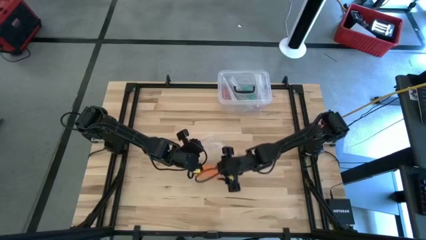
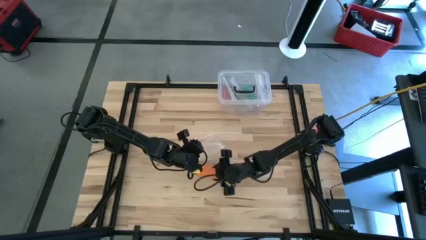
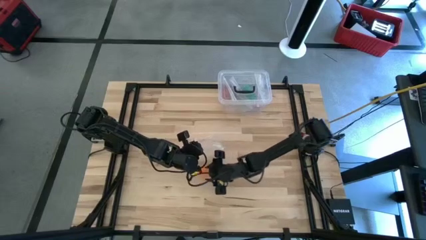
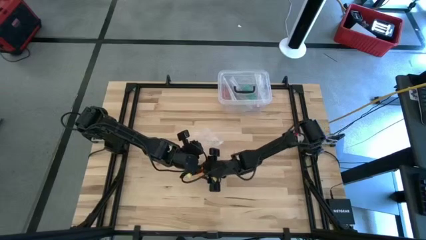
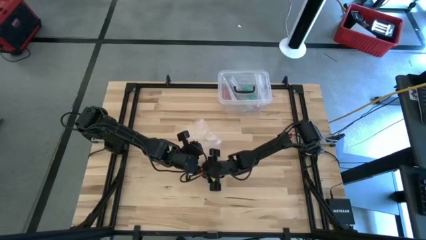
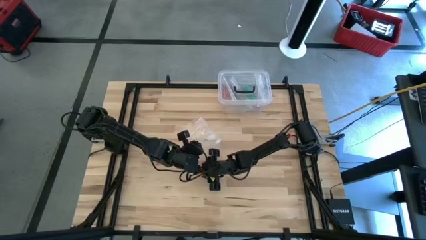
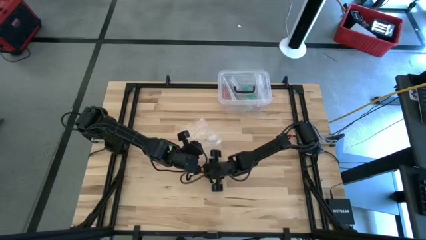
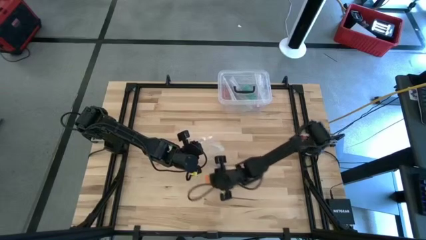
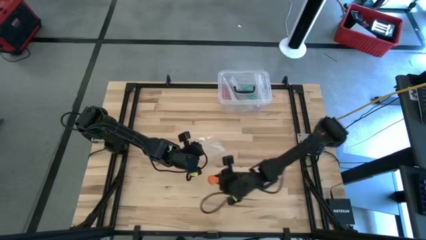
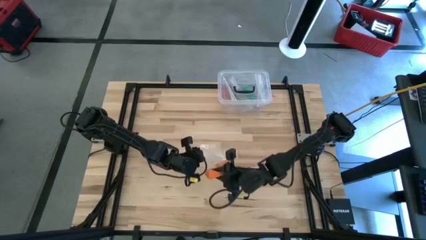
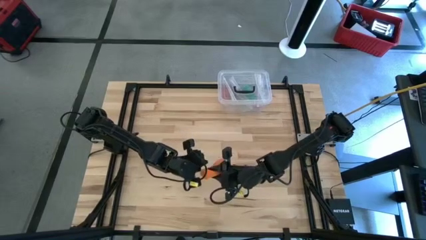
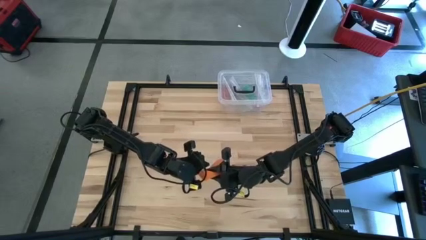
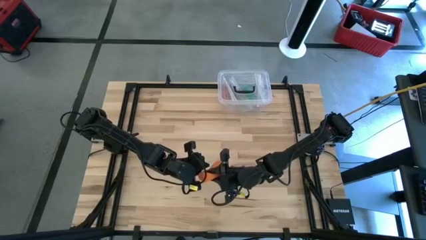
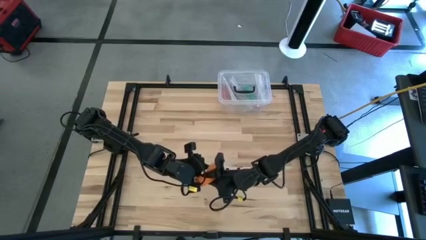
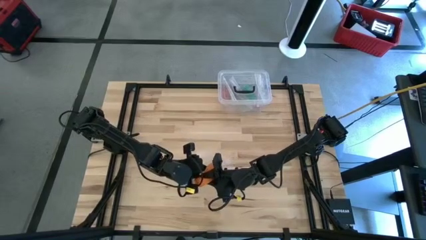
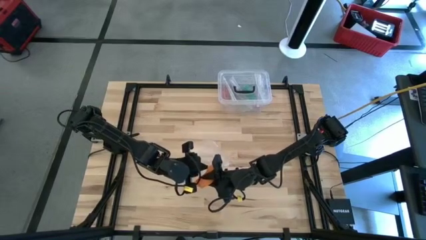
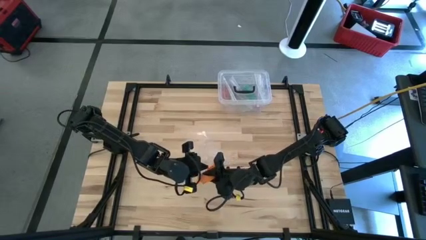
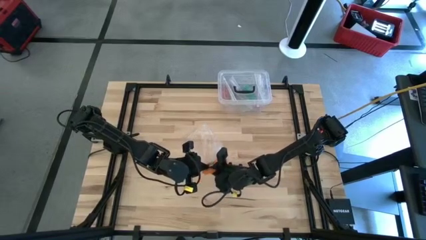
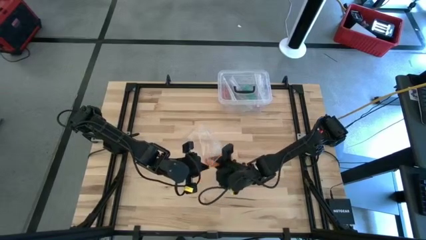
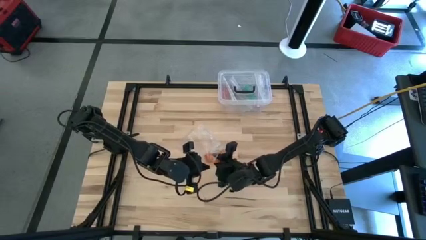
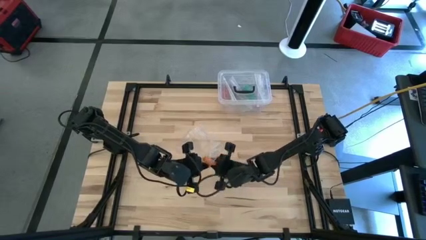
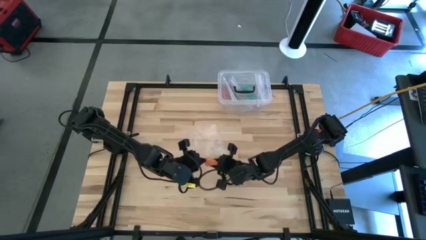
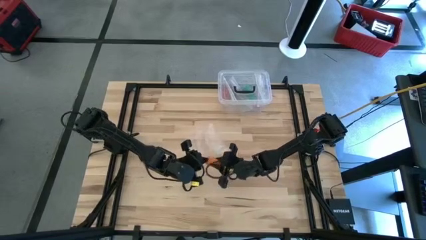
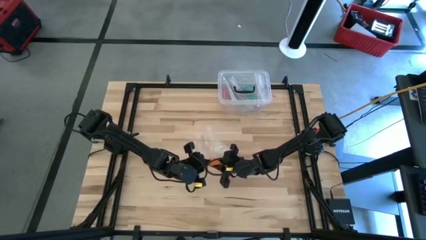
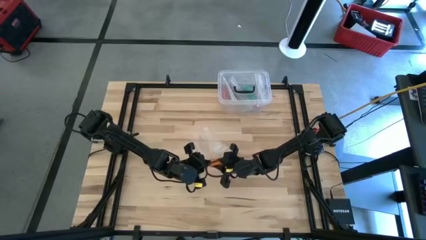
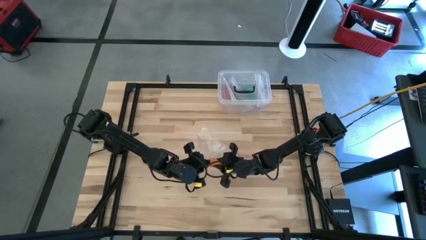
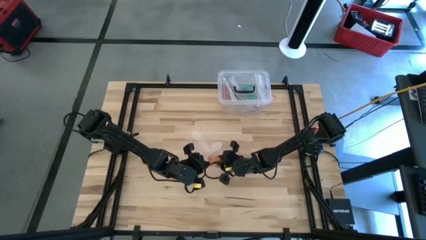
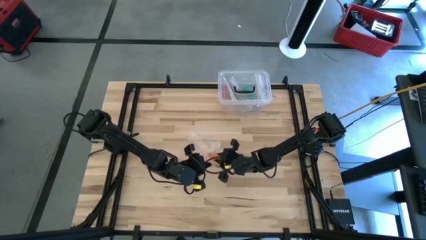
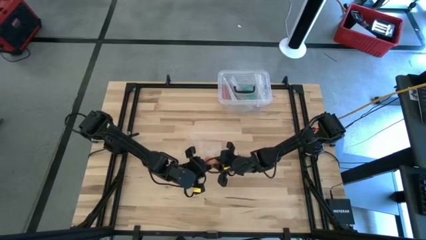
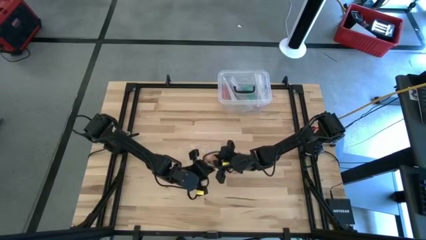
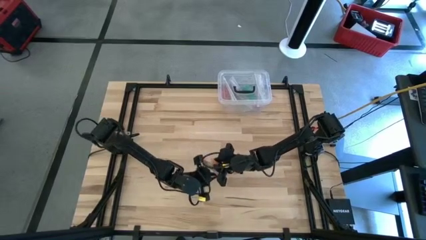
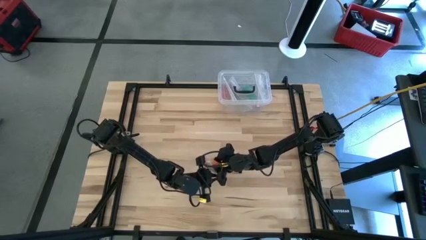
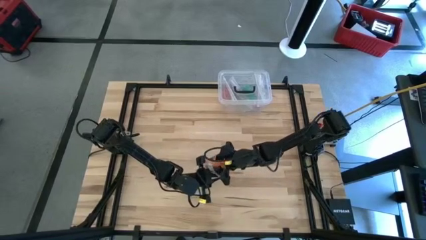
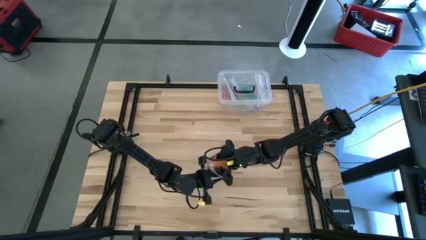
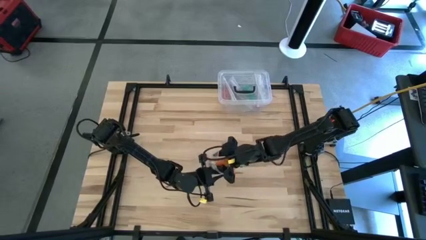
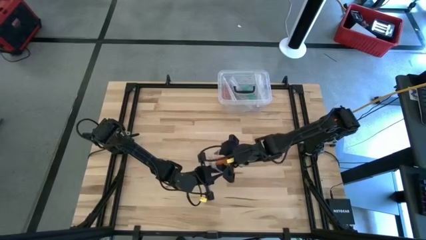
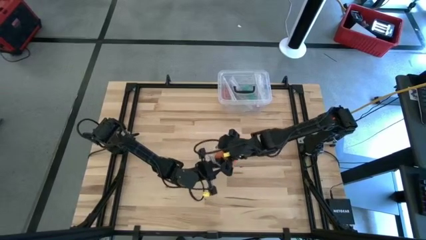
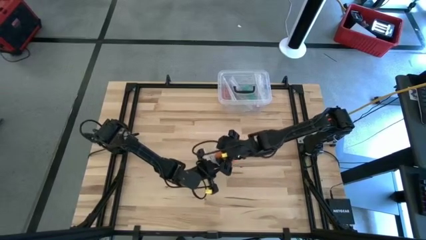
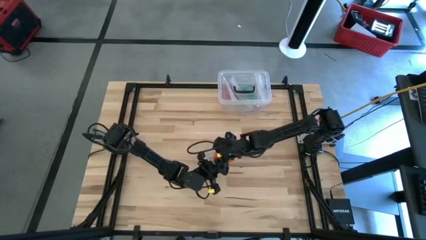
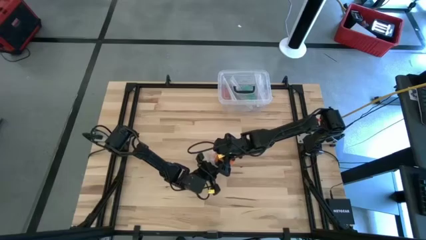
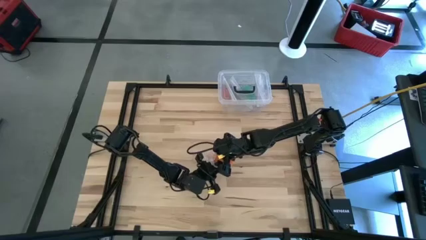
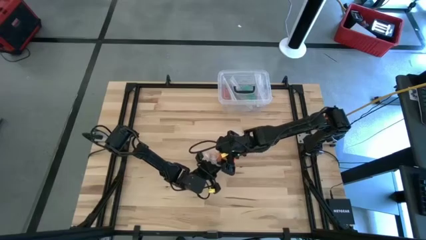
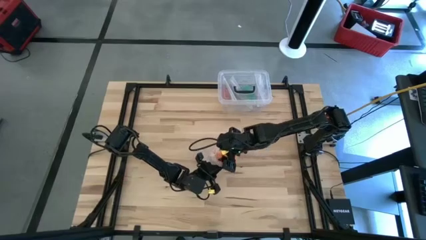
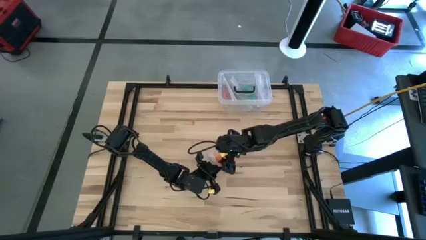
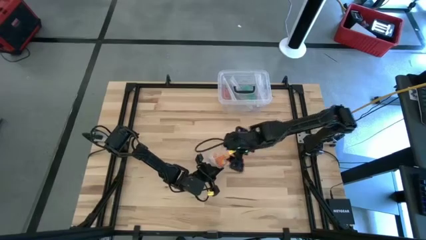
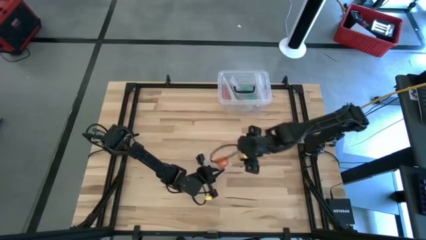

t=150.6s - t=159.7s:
Task: Roll bandage
Put the orange bandage inside the zip bag

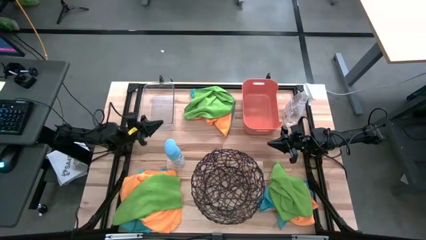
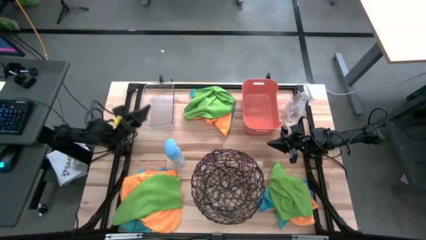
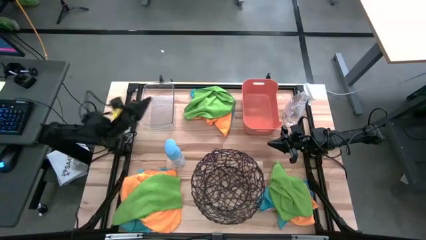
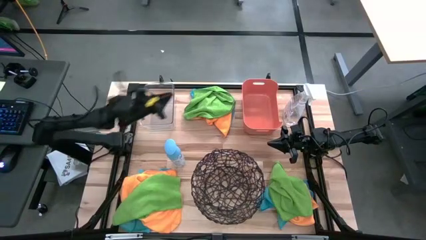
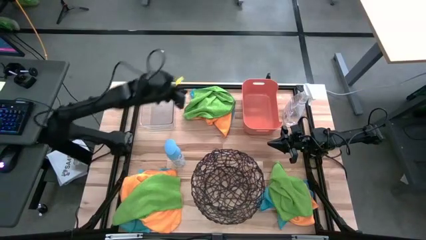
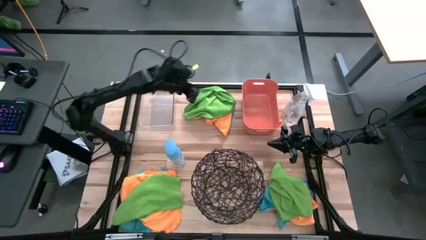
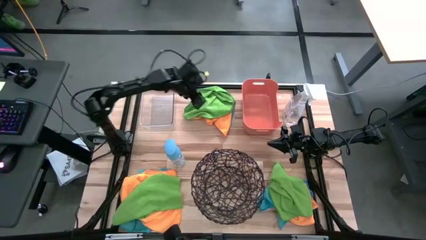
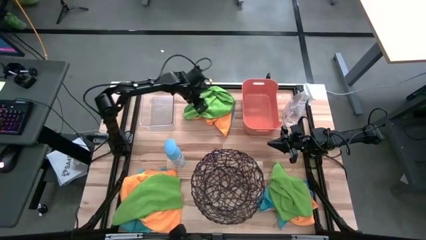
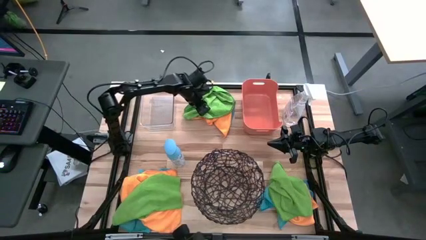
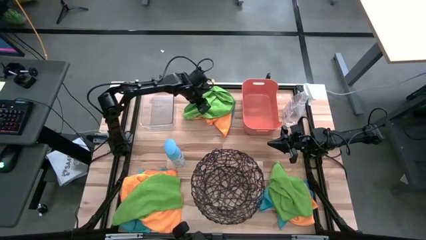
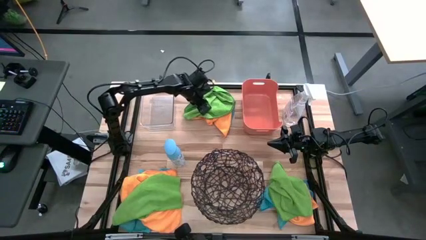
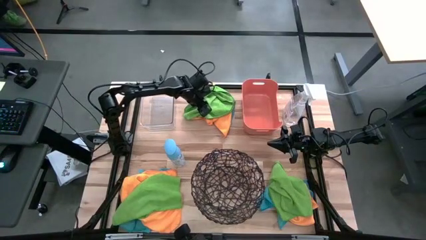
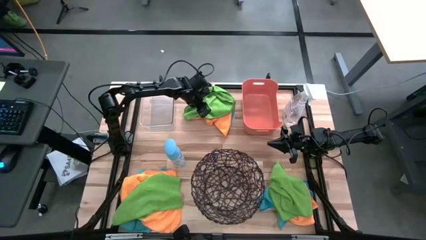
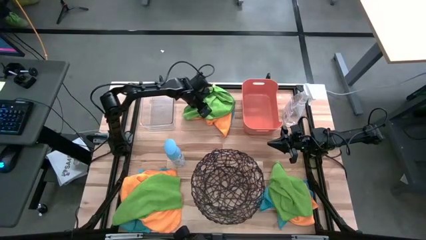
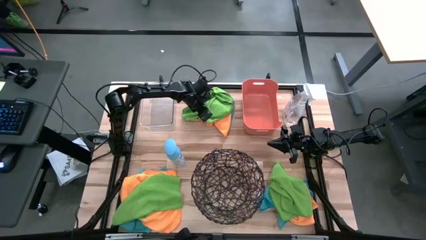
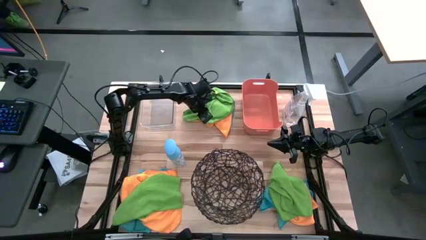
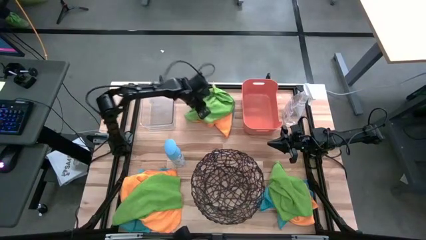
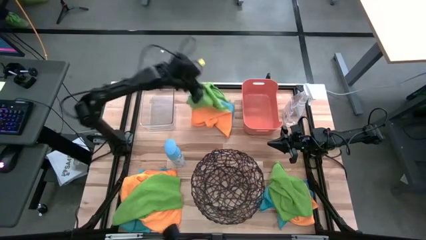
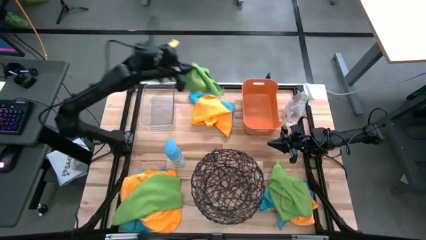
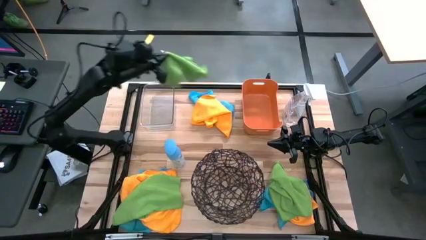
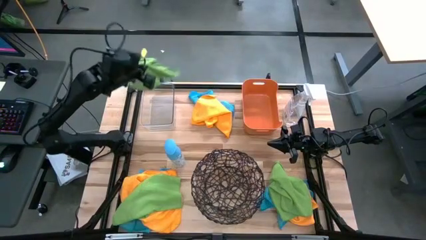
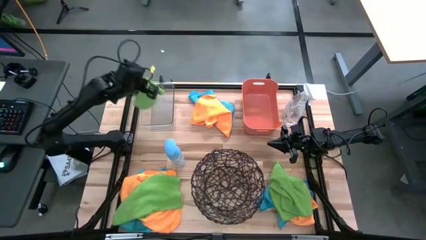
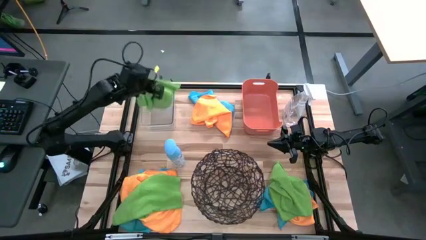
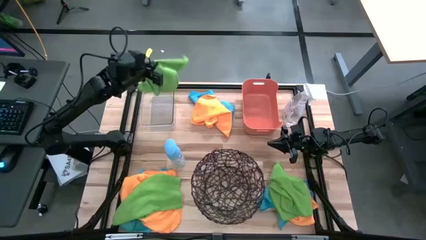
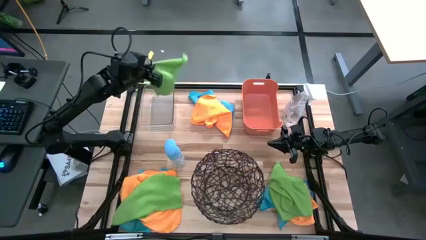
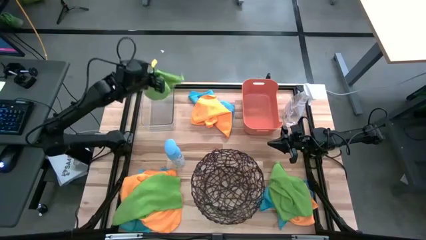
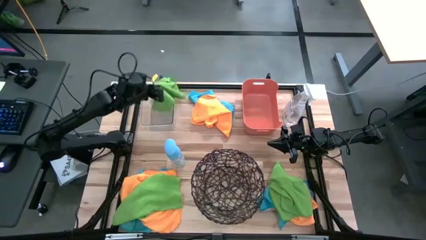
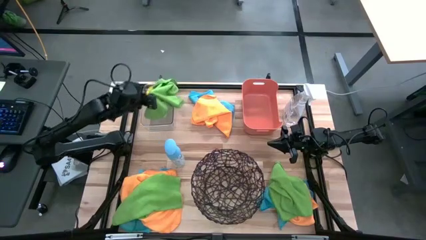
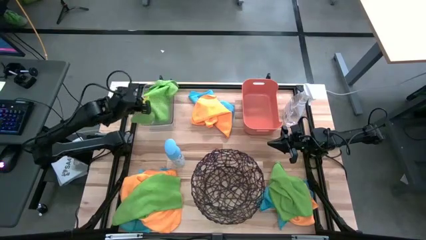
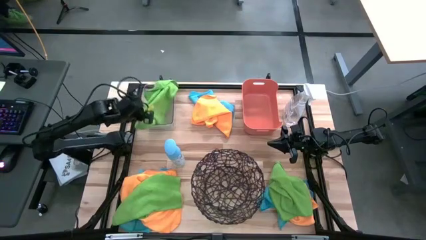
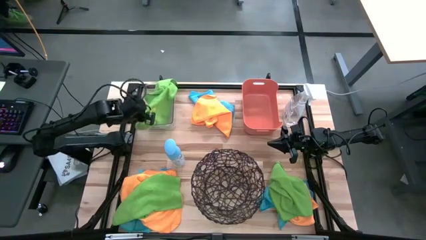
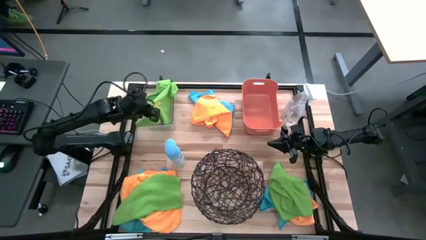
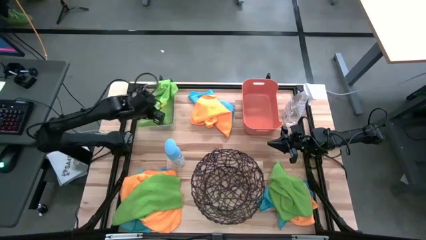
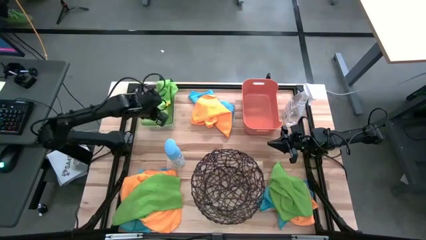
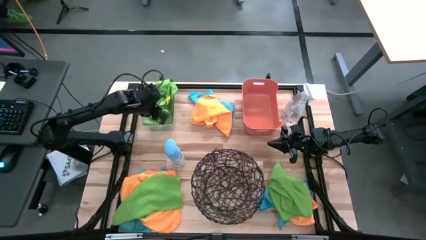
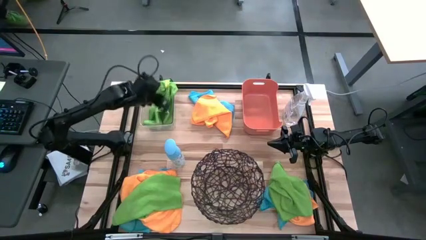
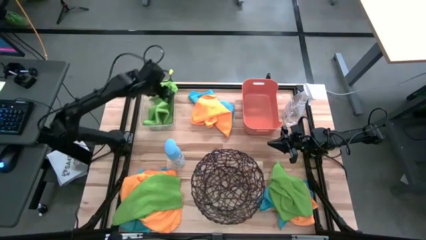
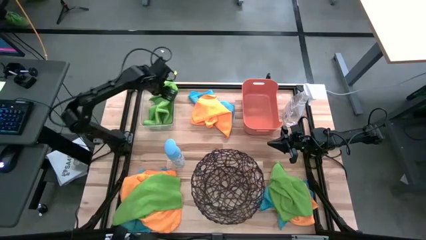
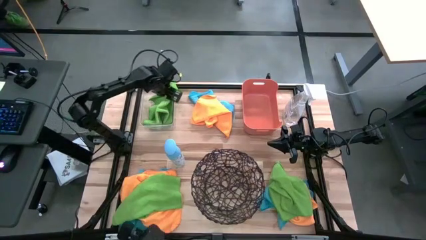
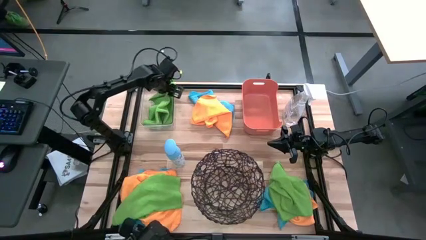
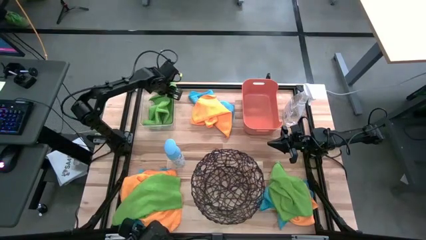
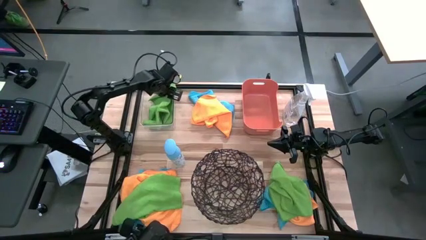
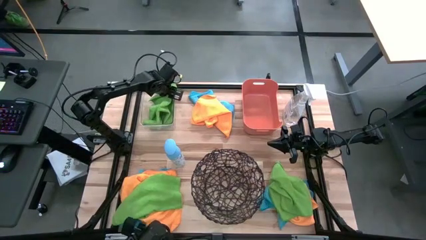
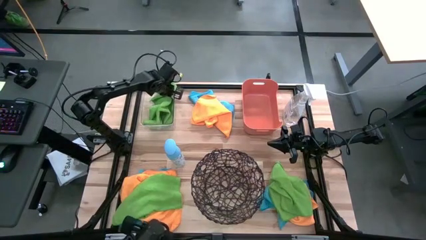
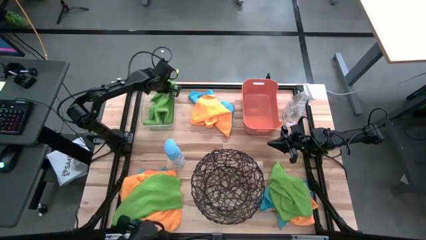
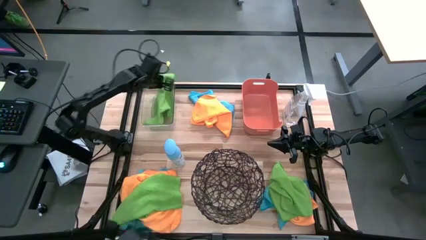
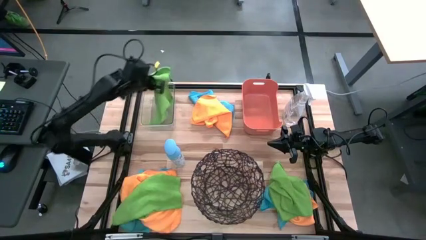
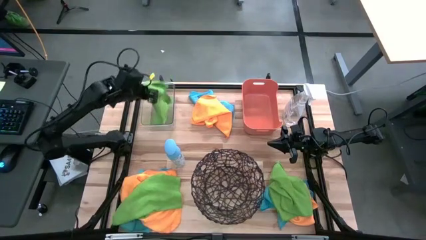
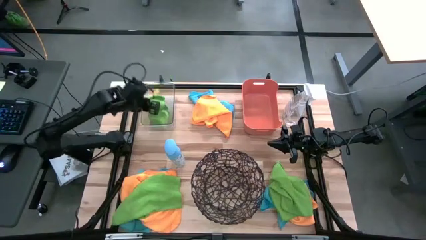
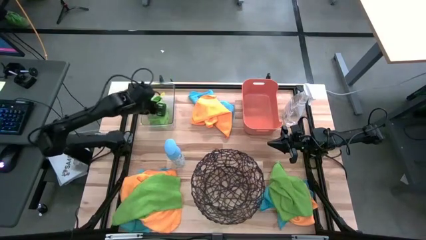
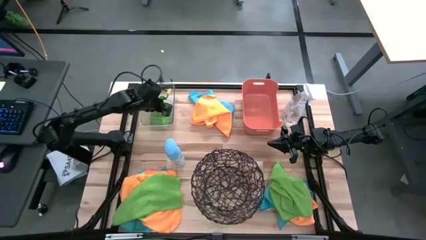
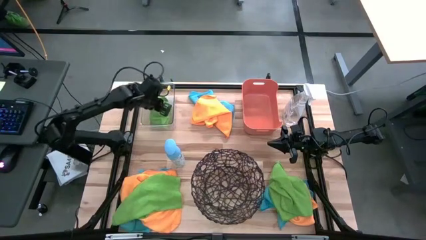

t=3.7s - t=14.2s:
Task: Sort microfiber towel by color & place in baskets
Put the top green microfiber cloth into the transparent bin
